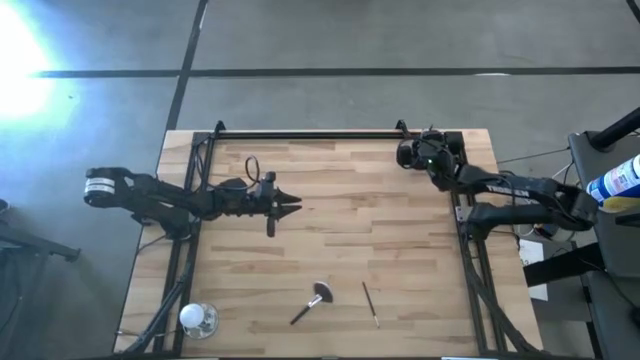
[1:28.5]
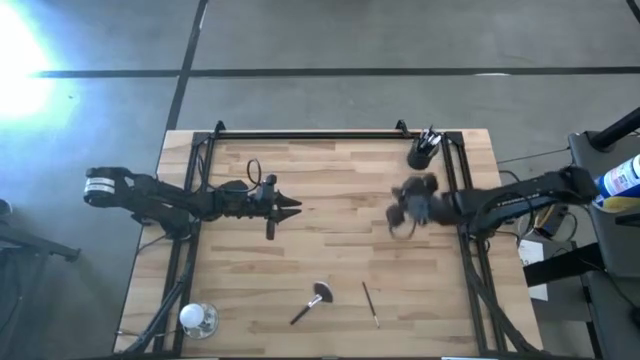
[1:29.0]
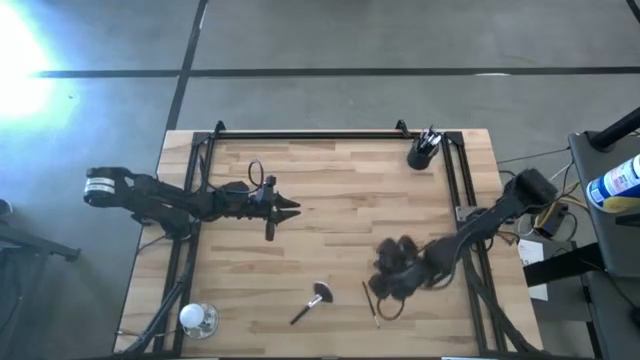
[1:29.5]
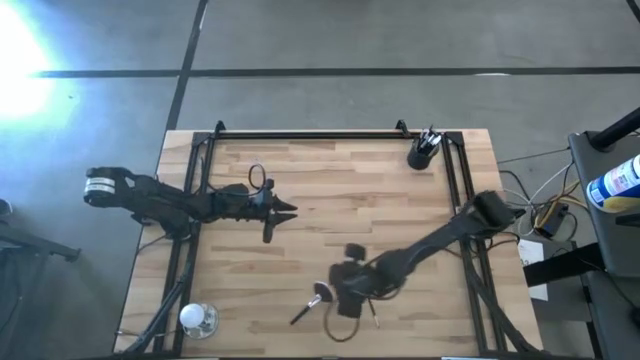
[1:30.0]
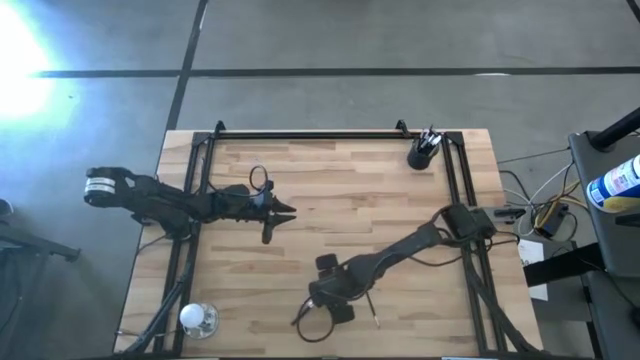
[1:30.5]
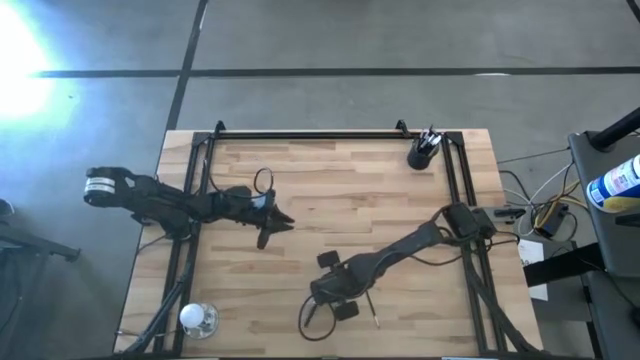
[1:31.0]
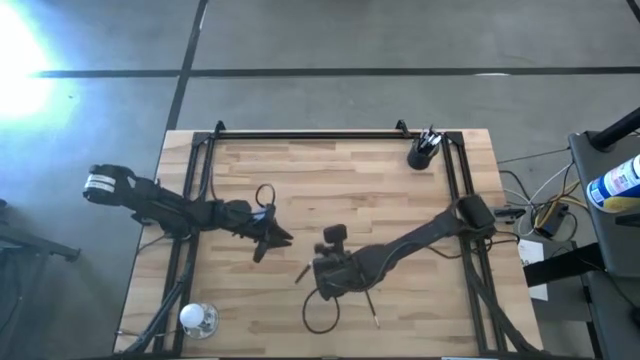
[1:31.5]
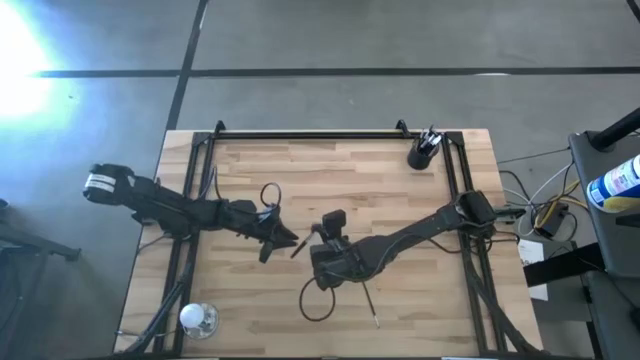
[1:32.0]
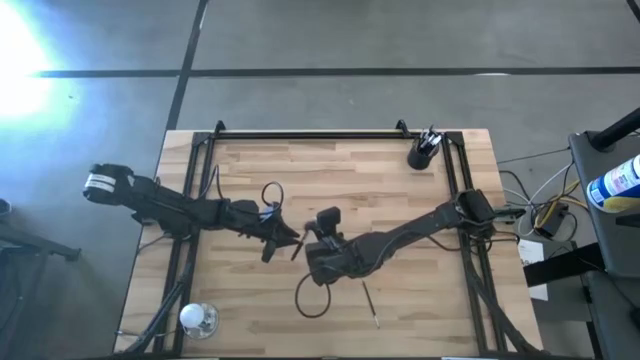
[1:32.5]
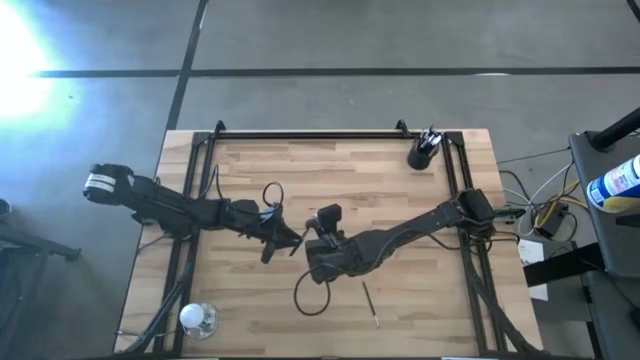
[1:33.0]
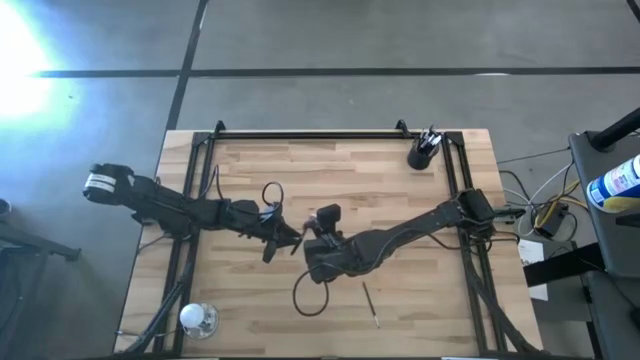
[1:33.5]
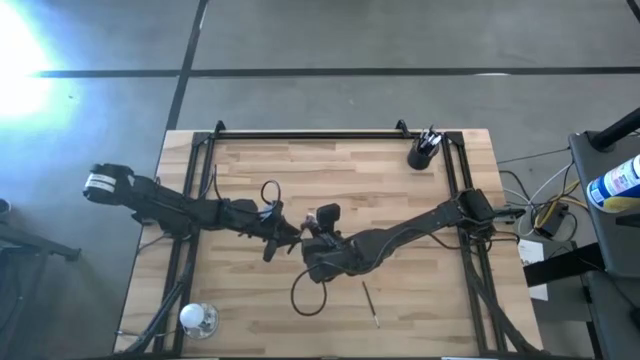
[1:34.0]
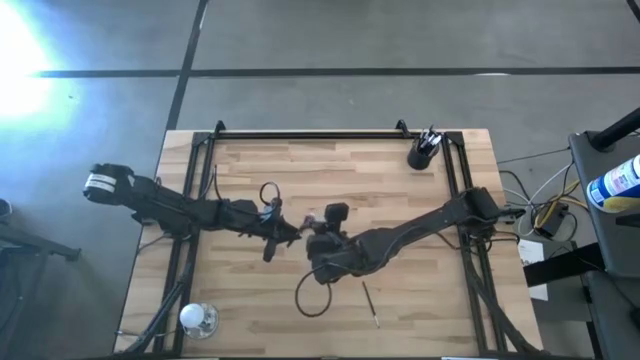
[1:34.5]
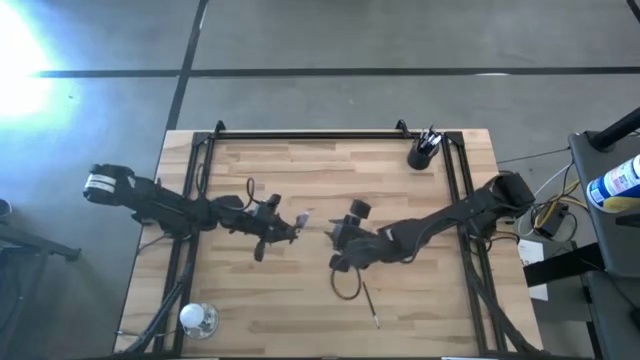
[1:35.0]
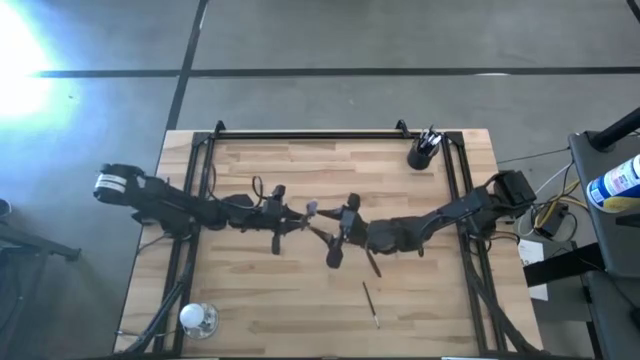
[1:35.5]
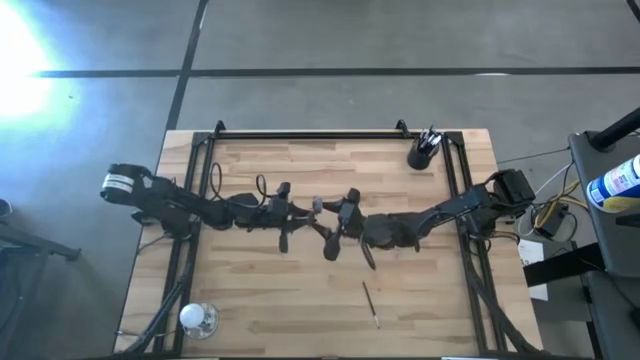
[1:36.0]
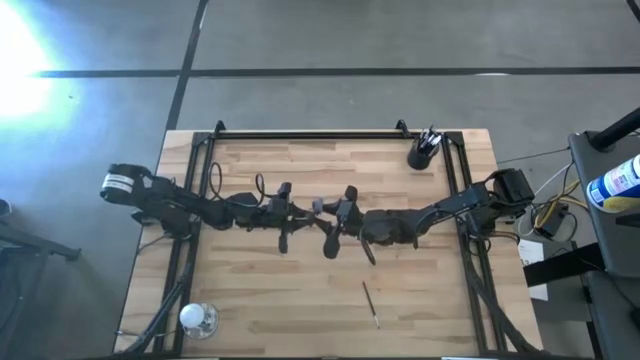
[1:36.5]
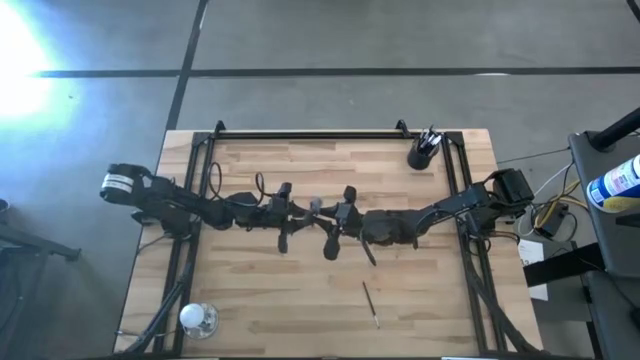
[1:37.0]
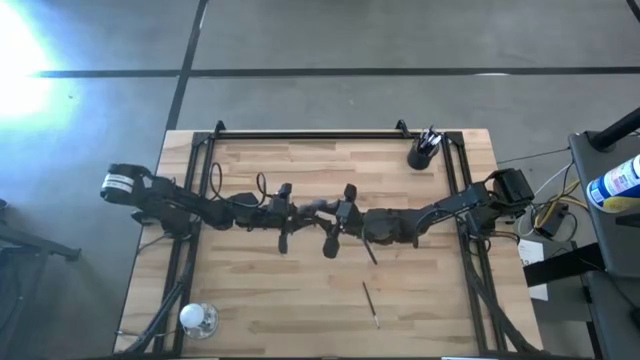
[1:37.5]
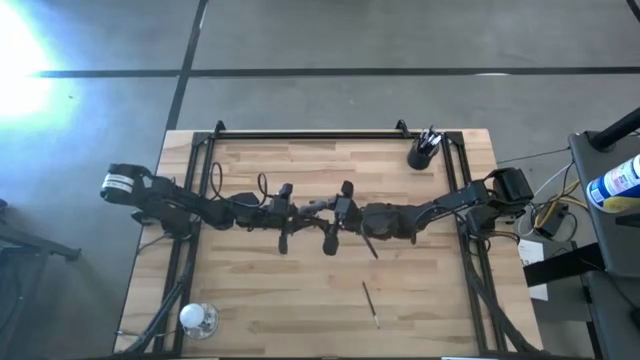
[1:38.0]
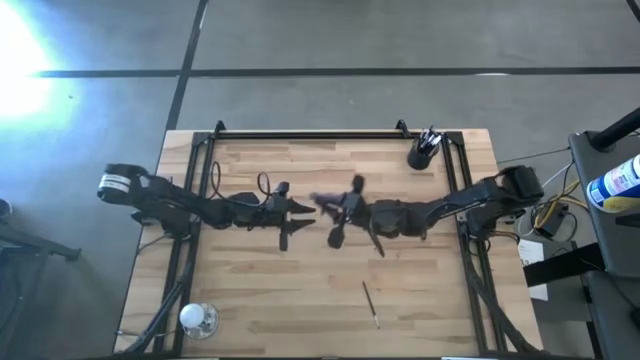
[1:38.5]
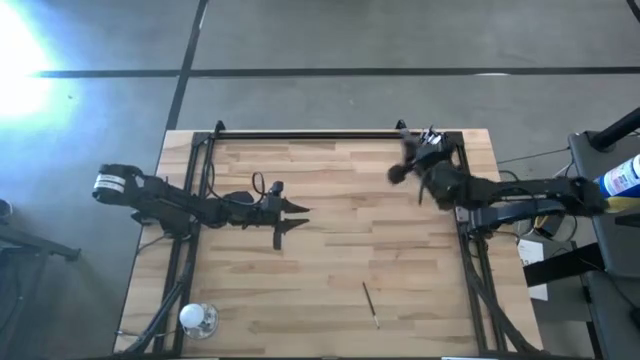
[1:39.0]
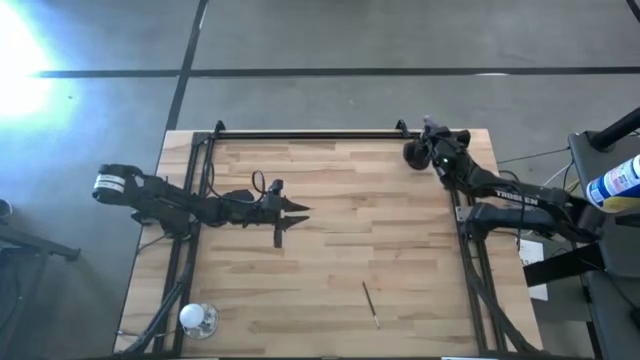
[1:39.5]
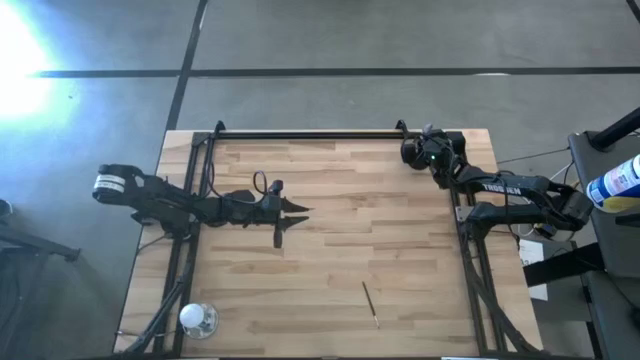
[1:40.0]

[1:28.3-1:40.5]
Task: Put items in baskets/containers
Put the highlighter brush into the pen holder

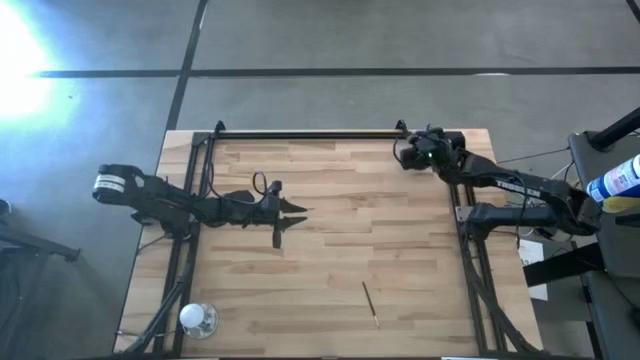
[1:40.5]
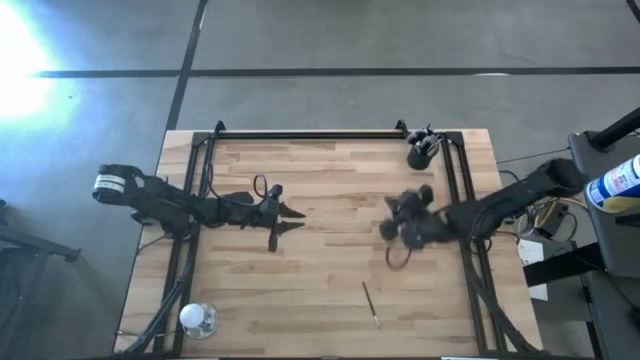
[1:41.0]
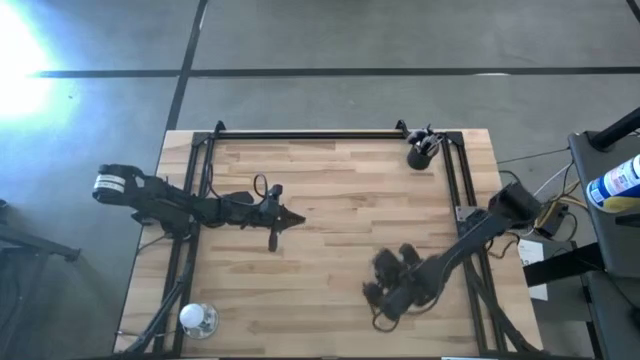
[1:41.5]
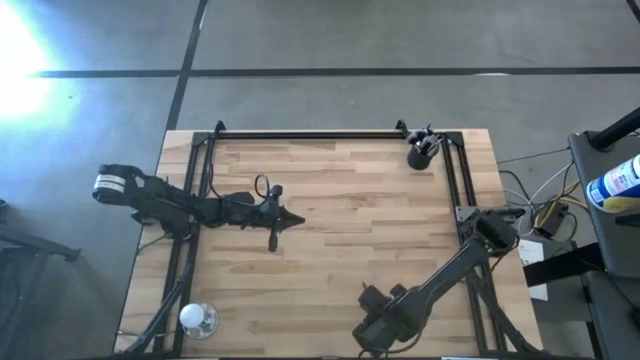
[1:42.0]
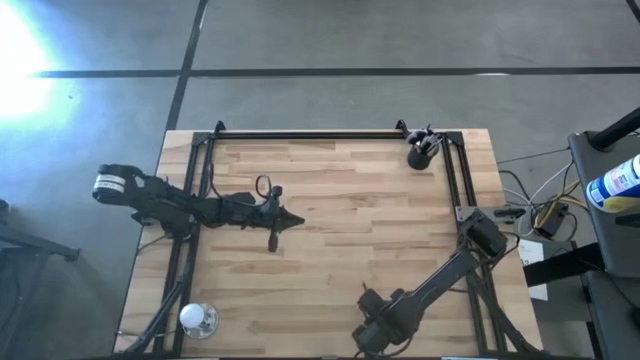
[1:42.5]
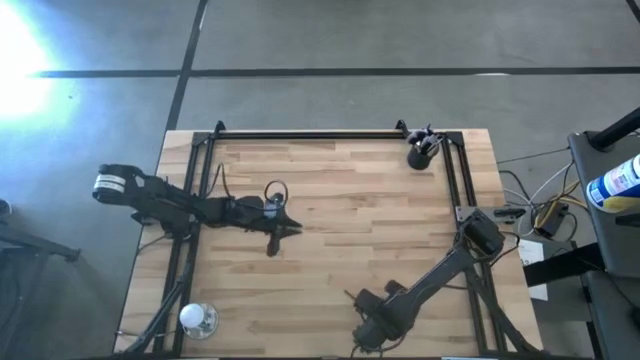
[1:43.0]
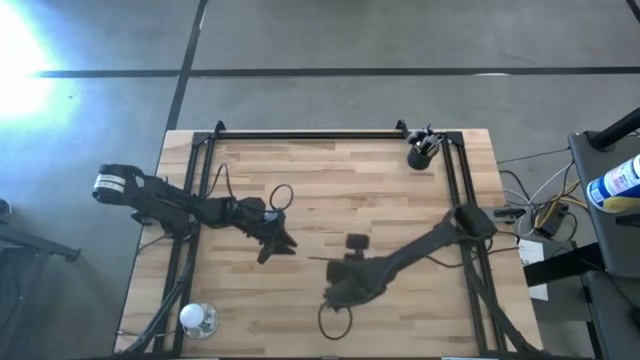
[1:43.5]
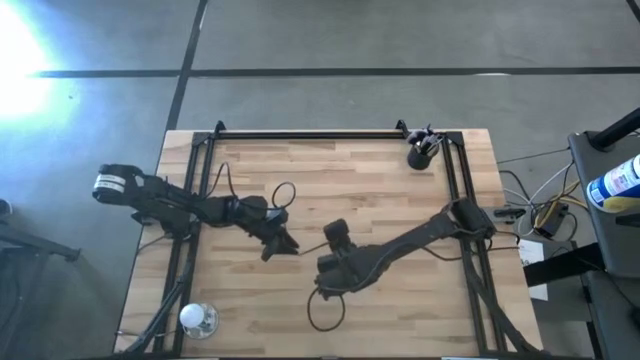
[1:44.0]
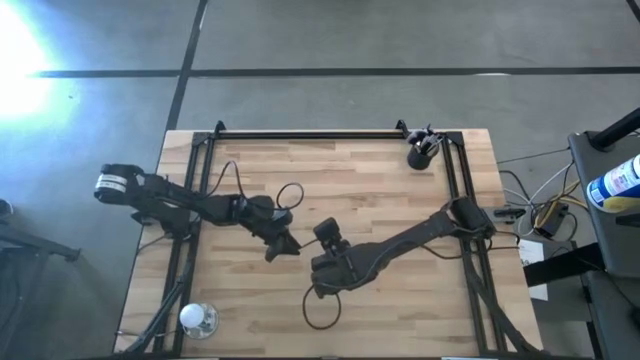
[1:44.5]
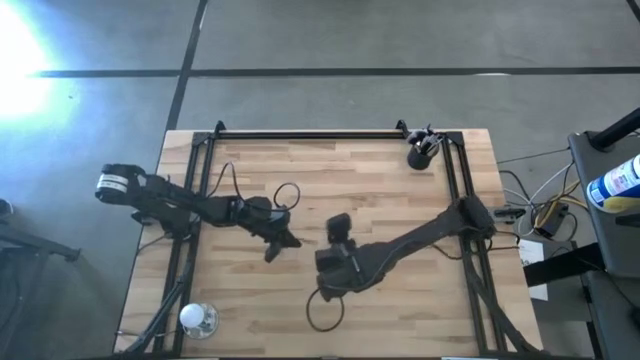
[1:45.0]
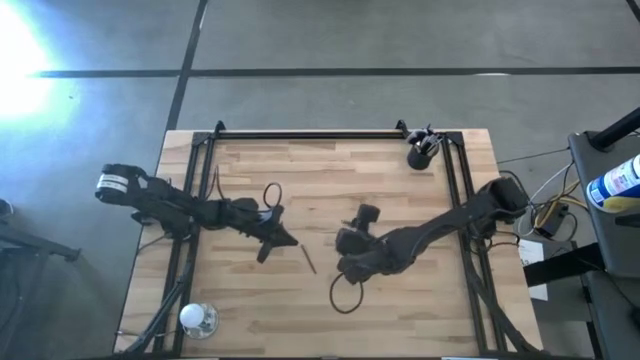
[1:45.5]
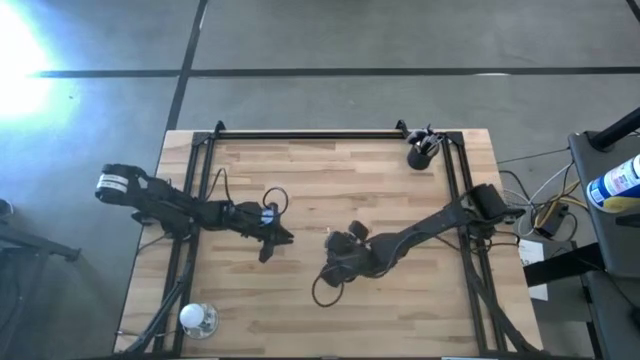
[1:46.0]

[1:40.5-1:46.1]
Put the eyeshadow brush into the pen holder

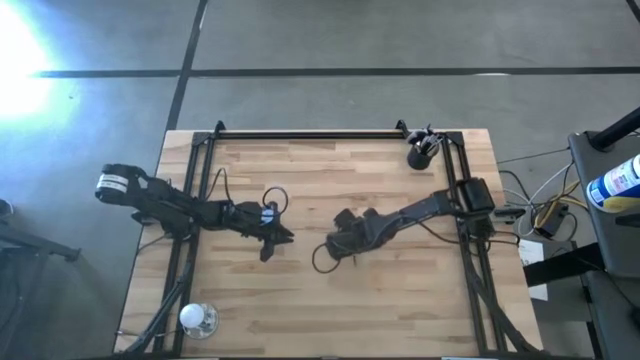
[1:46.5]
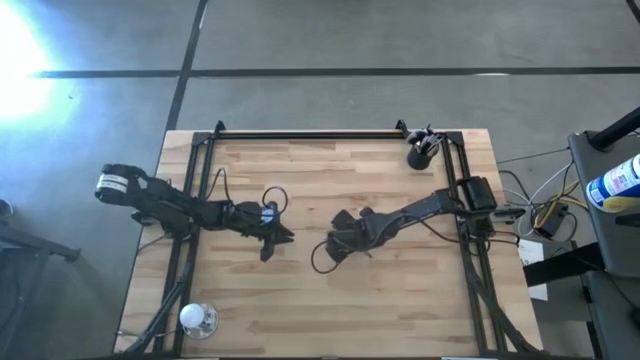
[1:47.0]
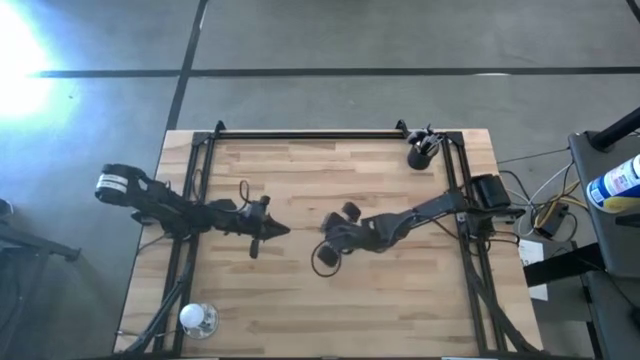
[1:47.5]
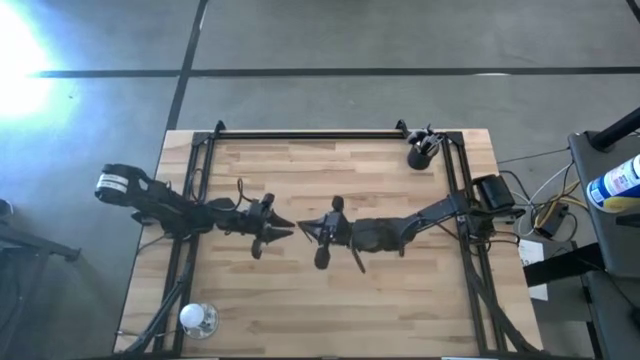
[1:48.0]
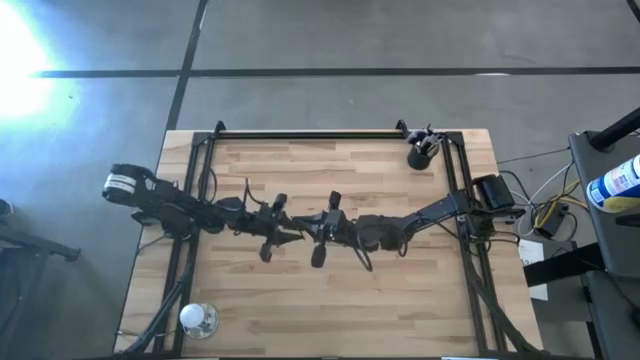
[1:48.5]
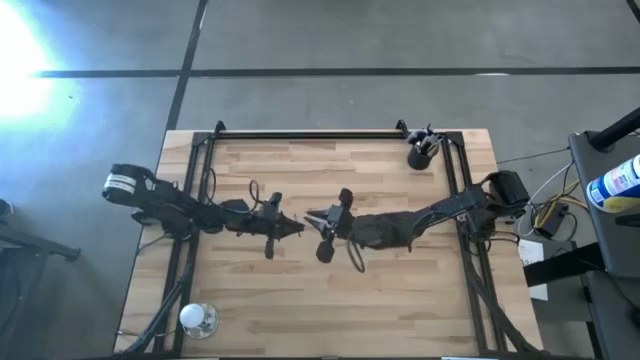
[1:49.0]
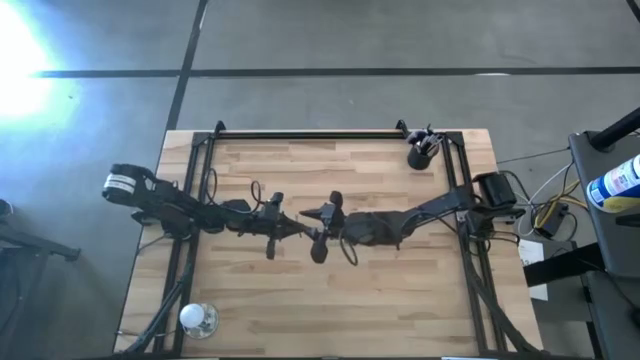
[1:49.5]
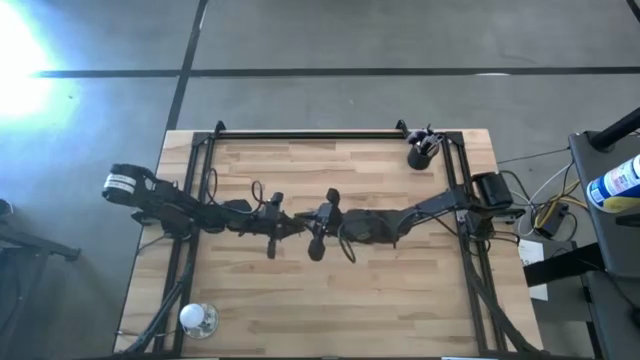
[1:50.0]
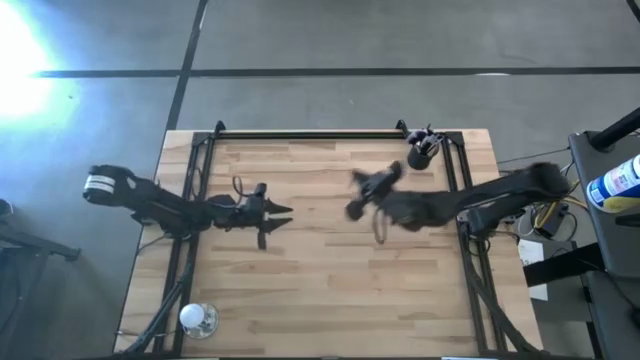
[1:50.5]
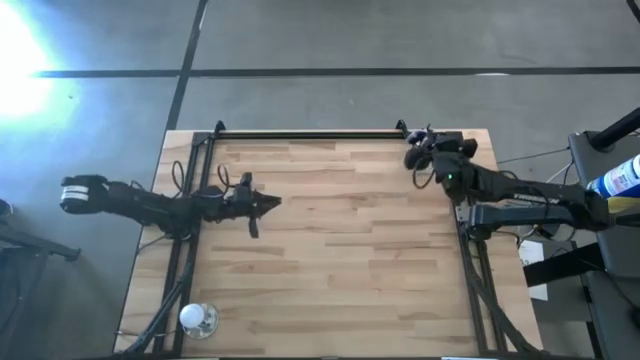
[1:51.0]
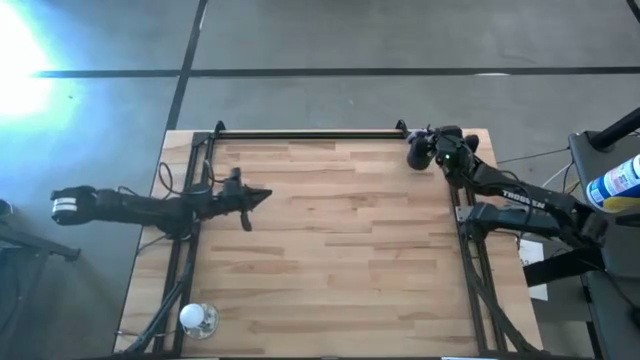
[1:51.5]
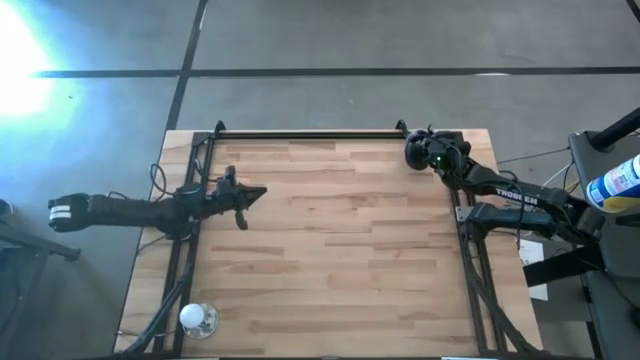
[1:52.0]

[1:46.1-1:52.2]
Put the eyeshadow brush into the pen holder
